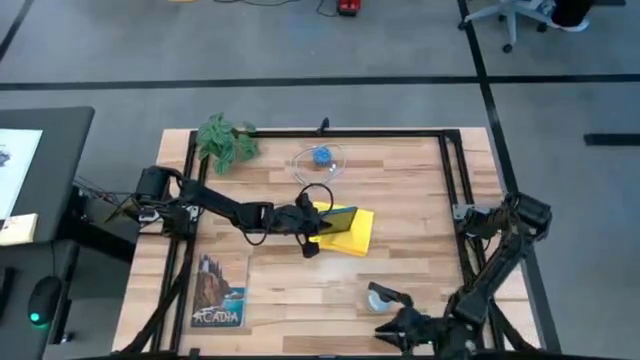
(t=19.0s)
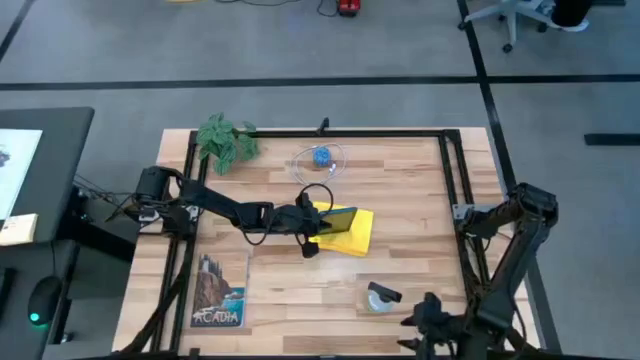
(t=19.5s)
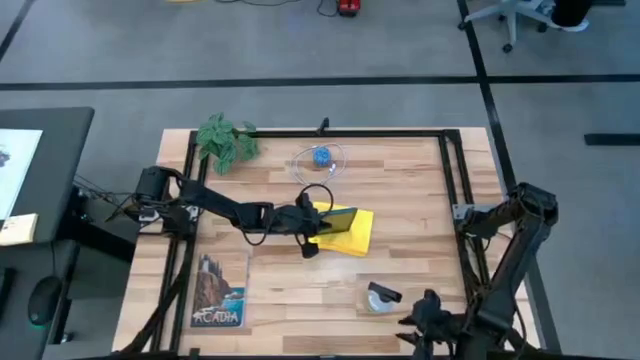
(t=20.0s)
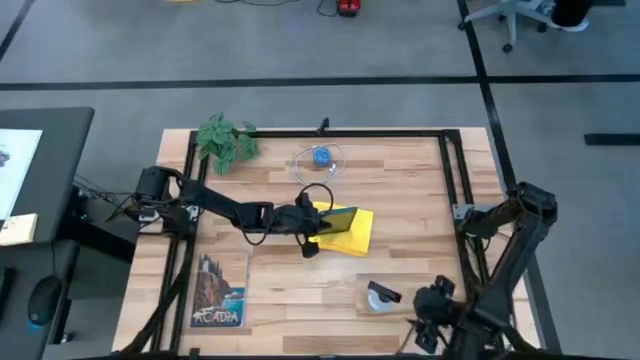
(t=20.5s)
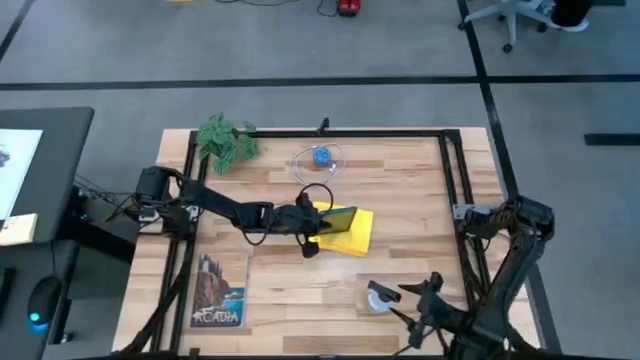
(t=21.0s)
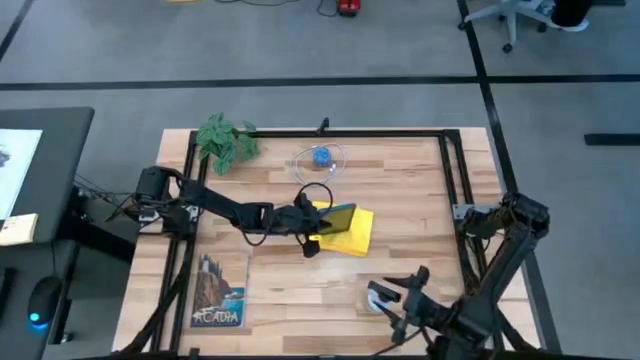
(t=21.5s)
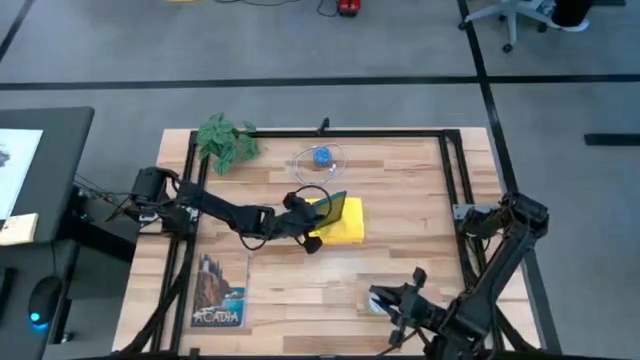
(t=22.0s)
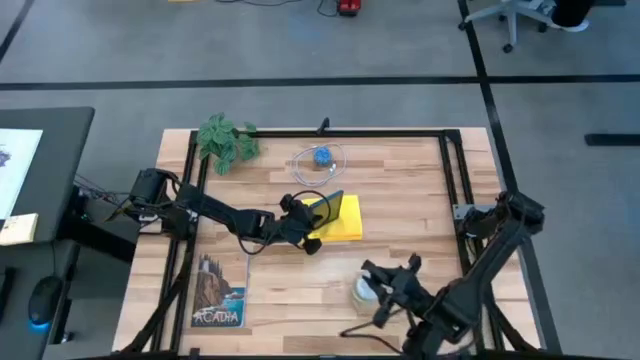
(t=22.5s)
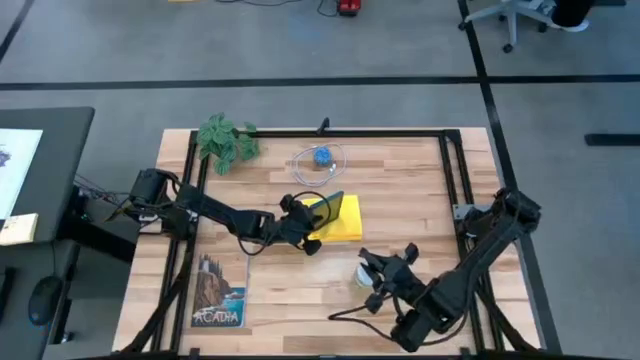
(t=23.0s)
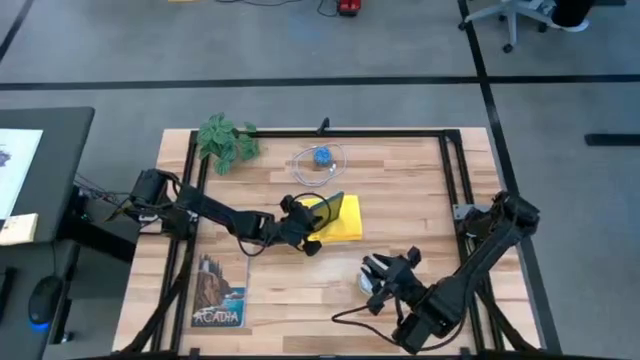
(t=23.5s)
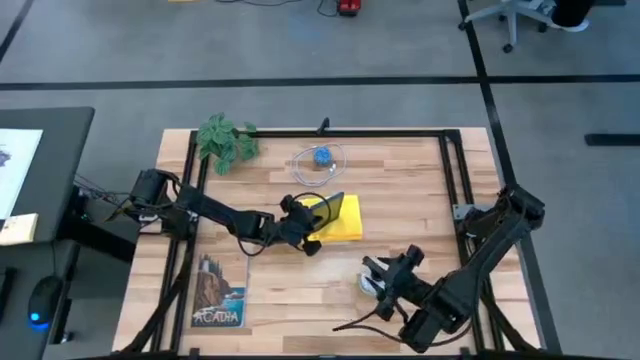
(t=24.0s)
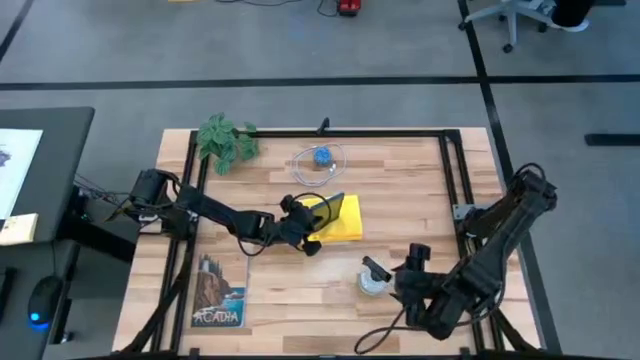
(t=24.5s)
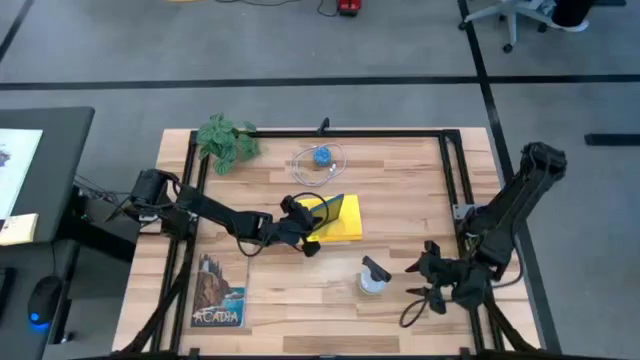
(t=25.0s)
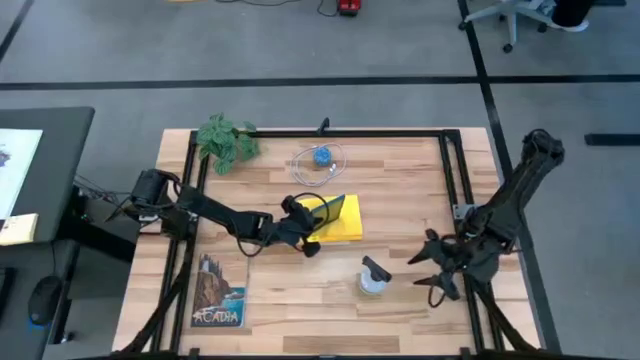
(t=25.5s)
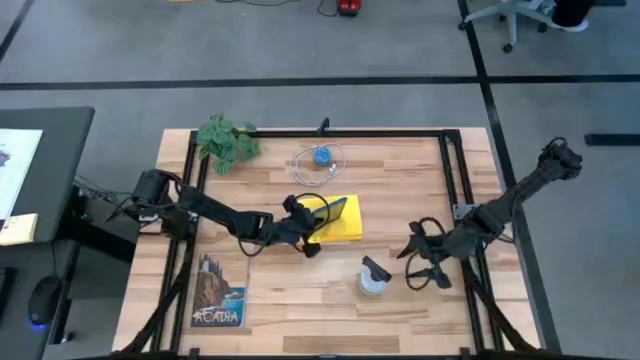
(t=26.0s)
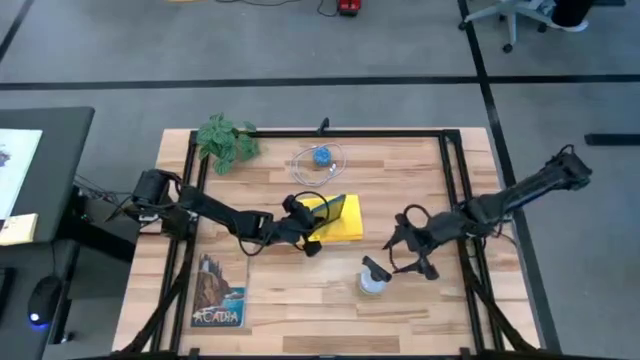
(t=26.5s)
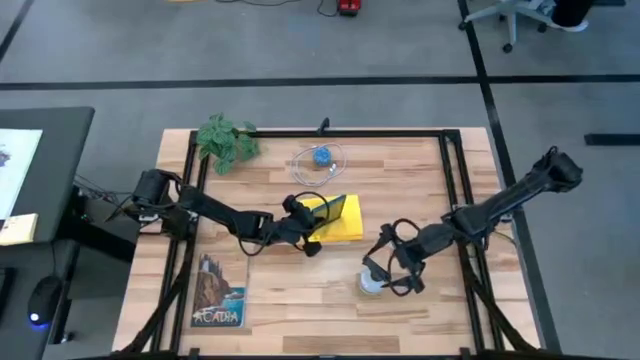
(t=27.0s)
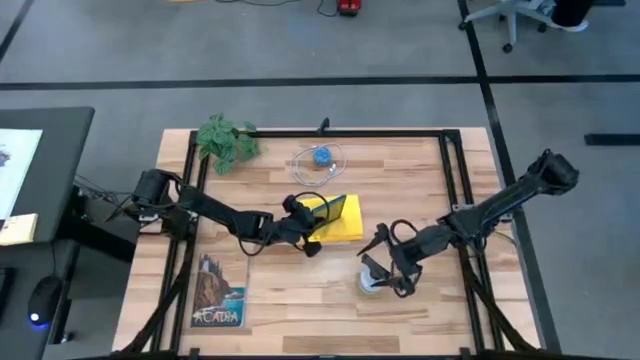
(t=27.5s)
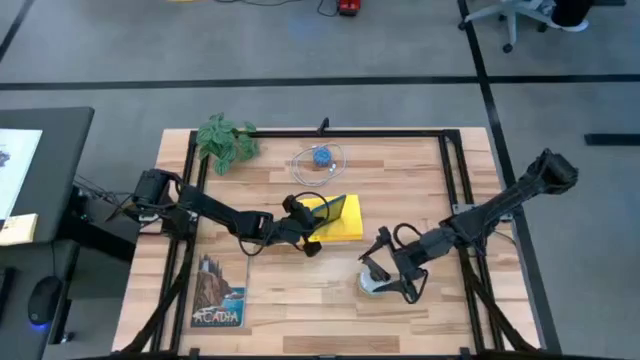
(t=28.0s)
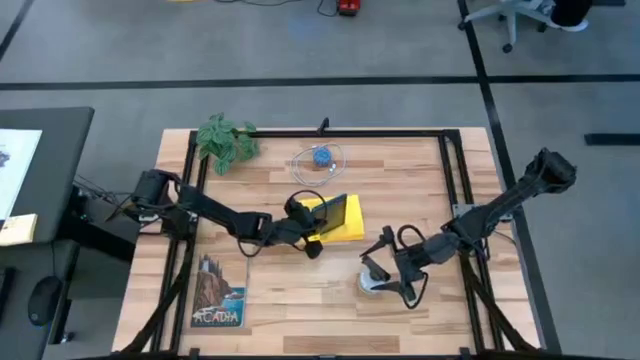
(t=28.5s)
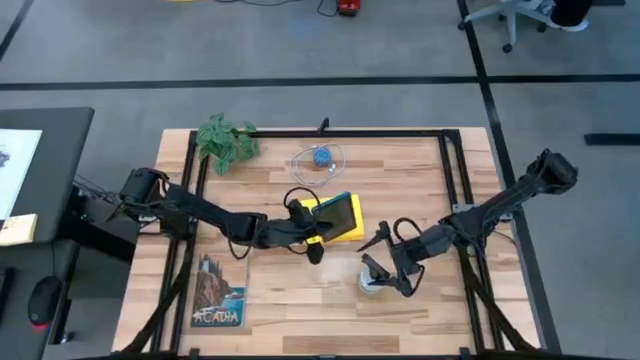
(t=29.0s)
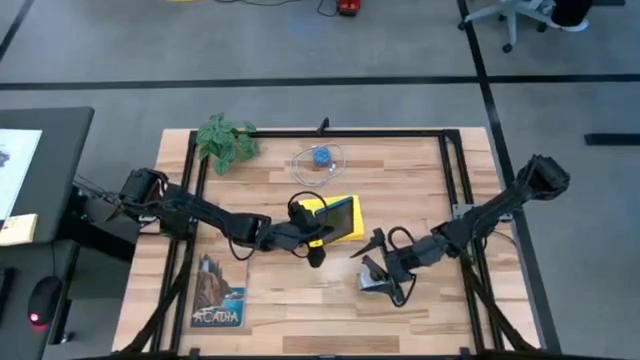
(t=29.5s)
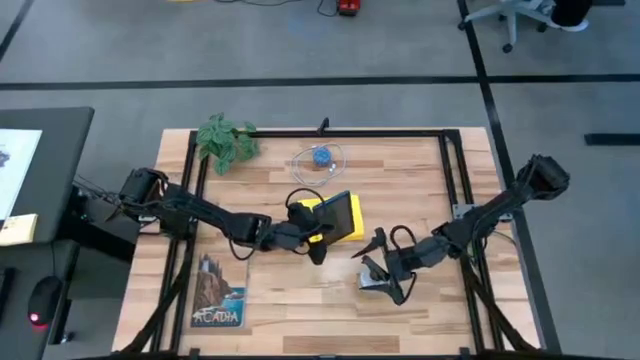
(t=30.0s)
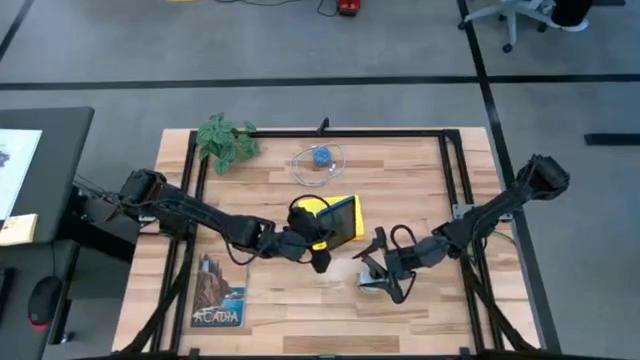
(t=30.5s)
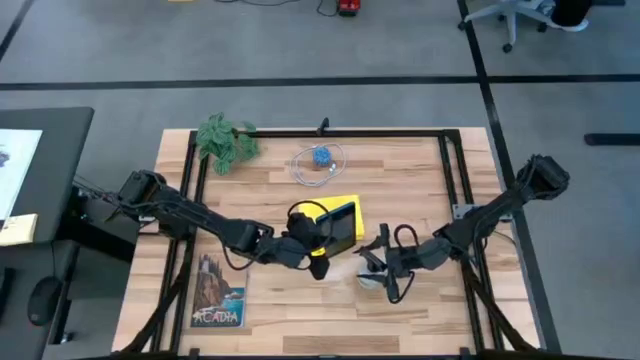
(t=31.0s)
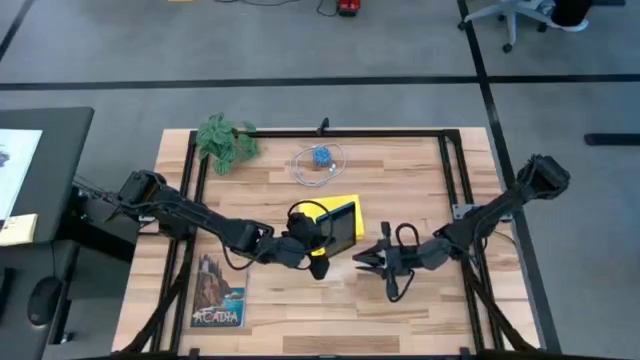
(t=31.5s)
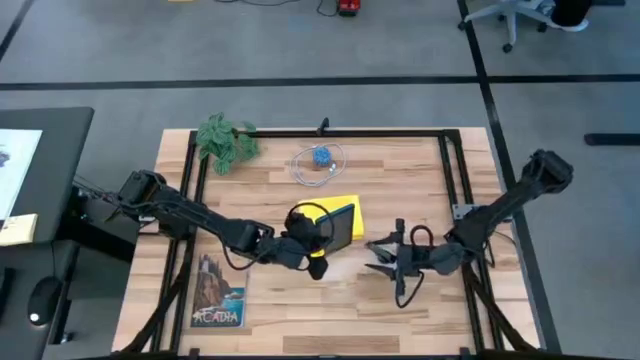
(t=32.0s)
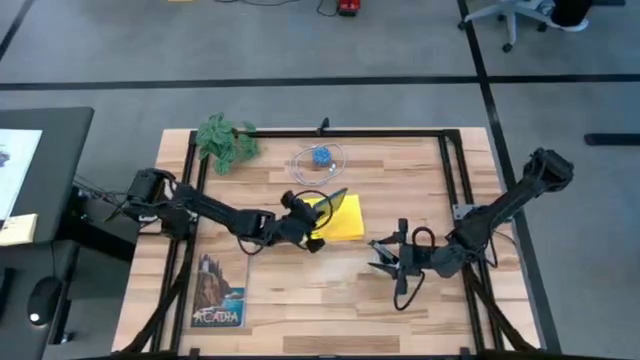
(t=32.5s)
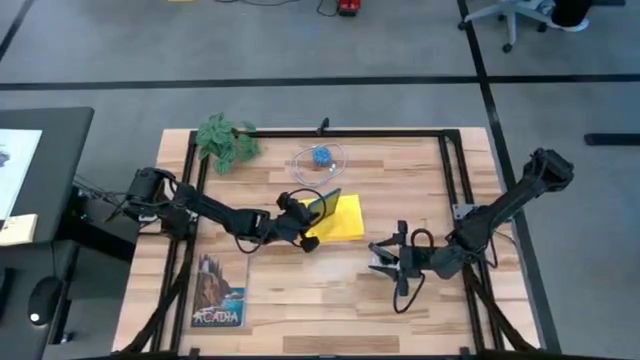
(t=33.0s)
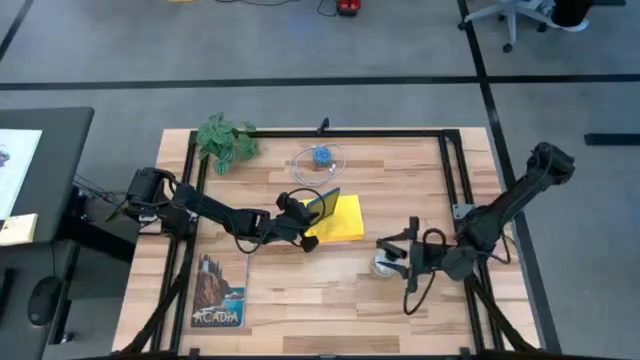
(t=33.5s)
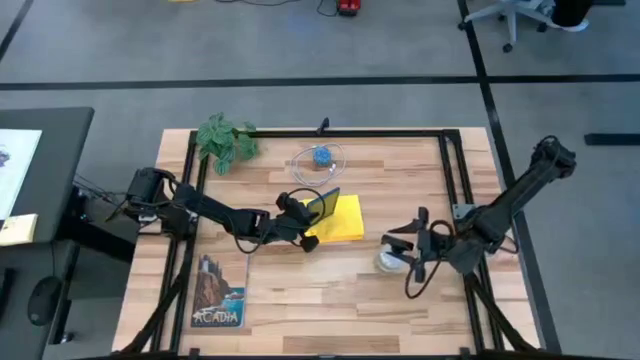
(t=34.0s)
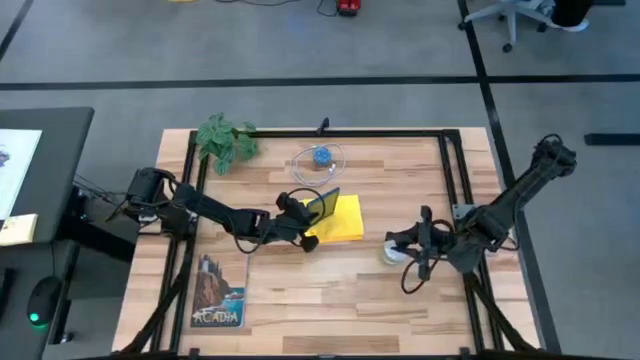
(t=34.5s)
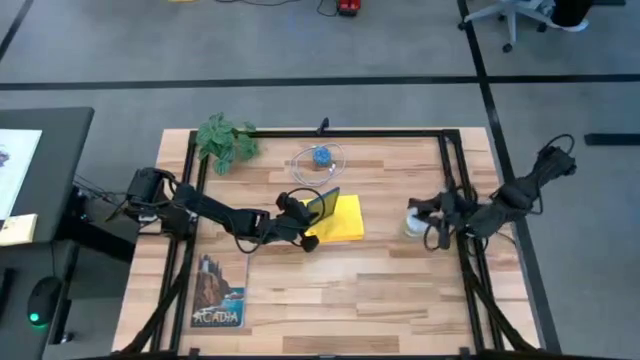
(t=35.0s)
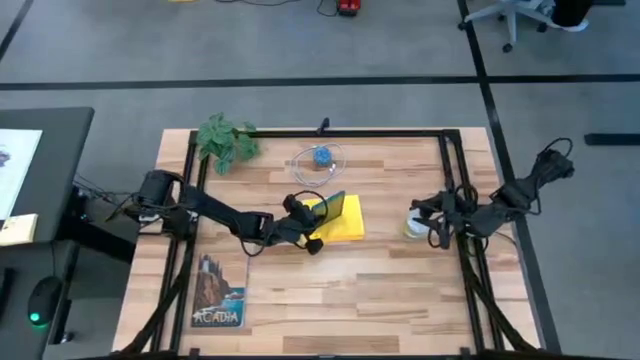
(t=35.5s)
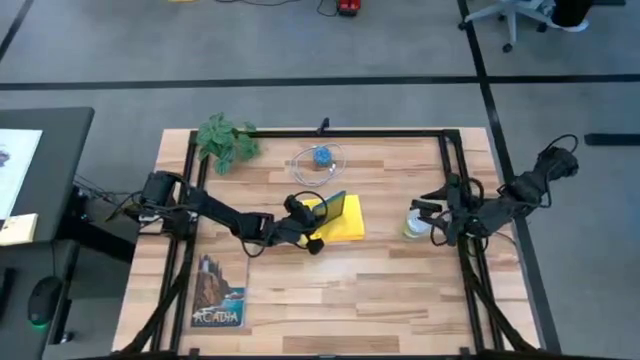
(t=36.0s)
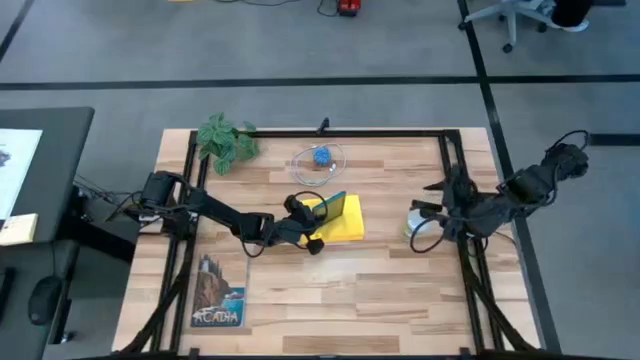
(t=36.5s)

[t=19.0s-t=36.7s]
Task: Apply microfiber cloth
Spray the tablet using the spray bottle

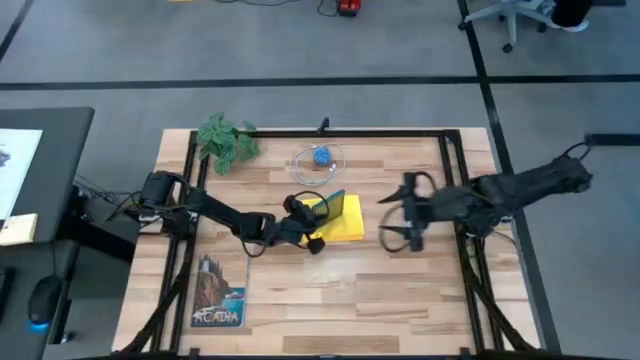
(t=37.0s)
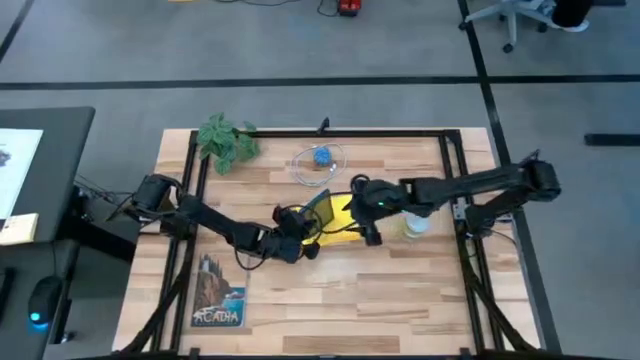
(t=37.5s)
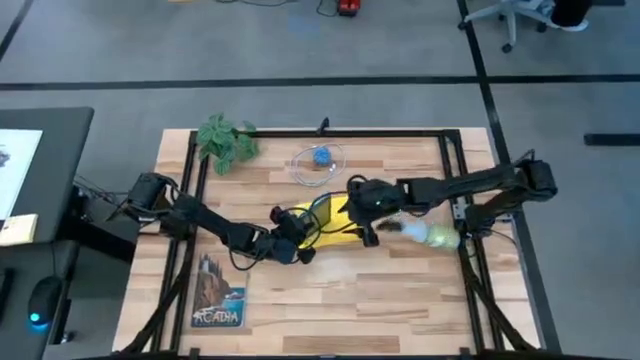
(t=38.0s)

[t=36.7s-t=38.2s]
Wipe the tablet with the yellow microfiber cloth
